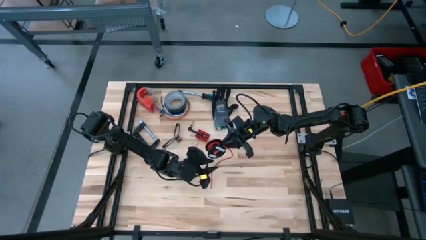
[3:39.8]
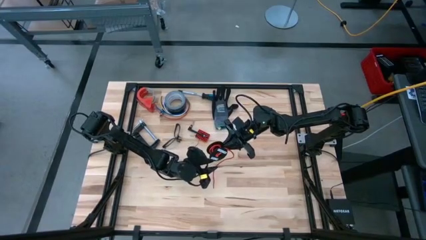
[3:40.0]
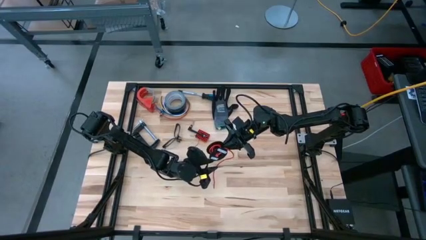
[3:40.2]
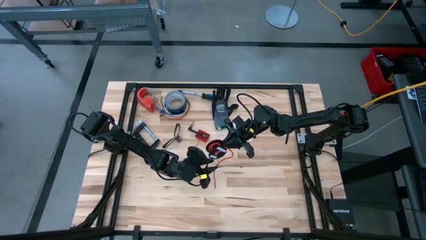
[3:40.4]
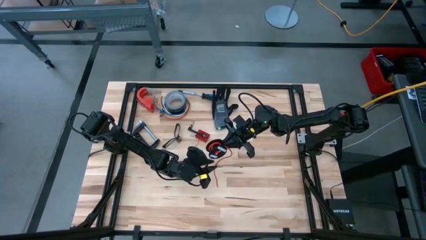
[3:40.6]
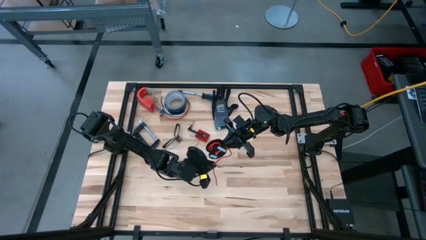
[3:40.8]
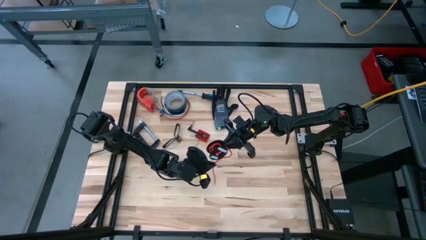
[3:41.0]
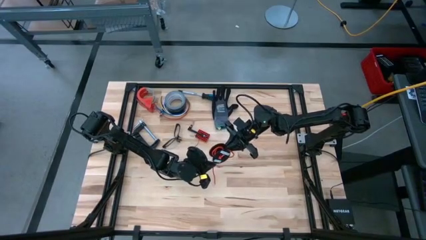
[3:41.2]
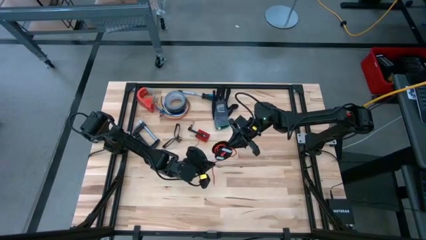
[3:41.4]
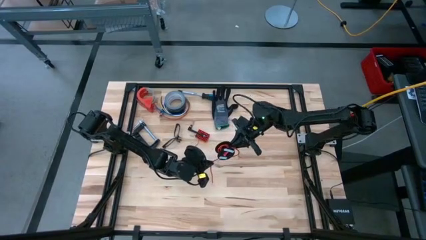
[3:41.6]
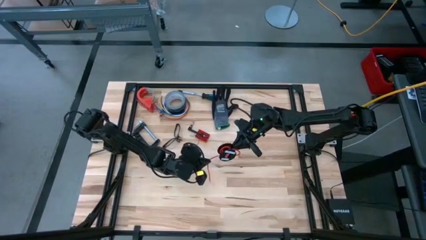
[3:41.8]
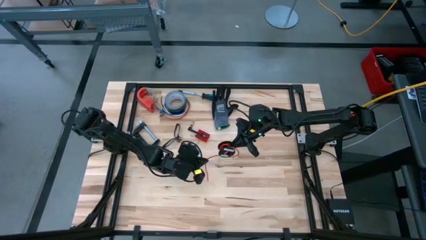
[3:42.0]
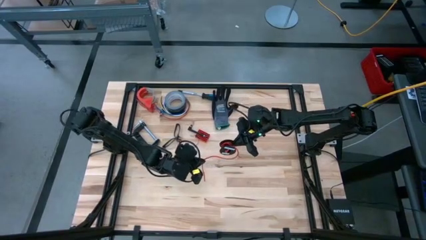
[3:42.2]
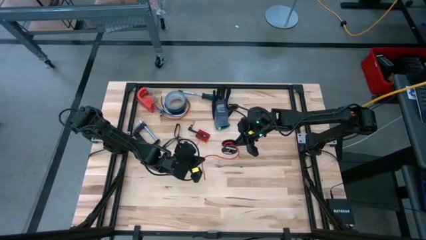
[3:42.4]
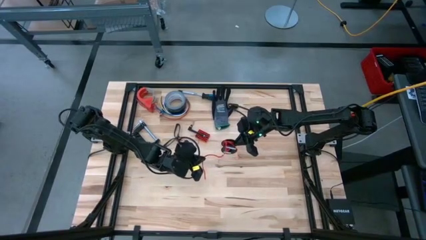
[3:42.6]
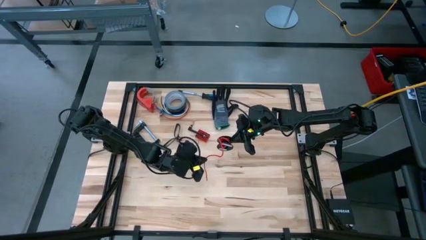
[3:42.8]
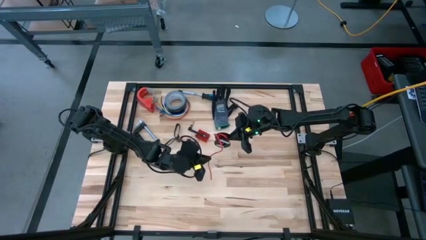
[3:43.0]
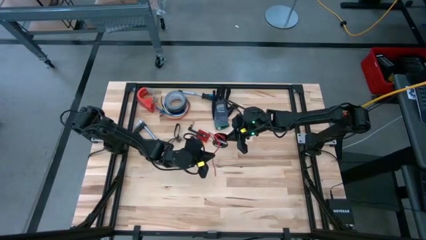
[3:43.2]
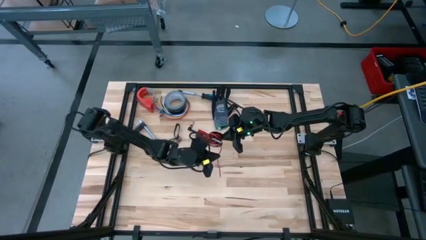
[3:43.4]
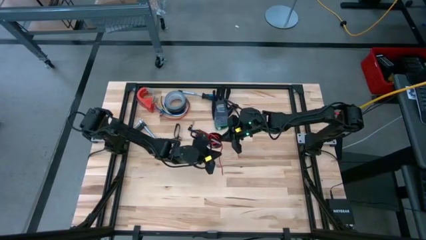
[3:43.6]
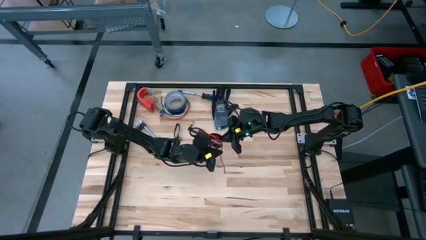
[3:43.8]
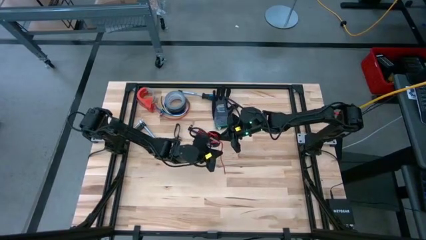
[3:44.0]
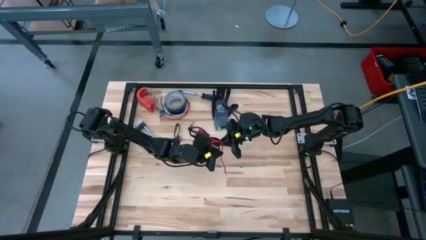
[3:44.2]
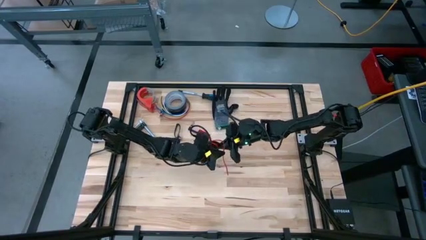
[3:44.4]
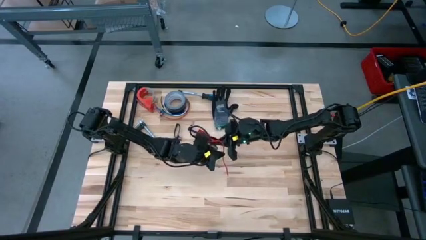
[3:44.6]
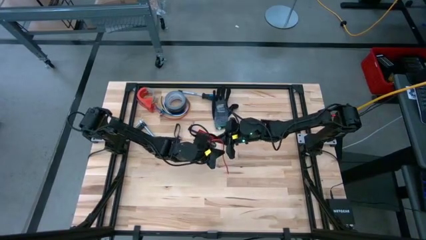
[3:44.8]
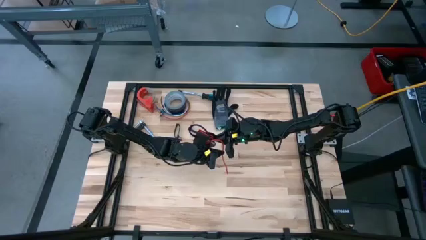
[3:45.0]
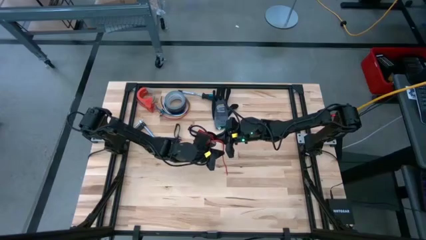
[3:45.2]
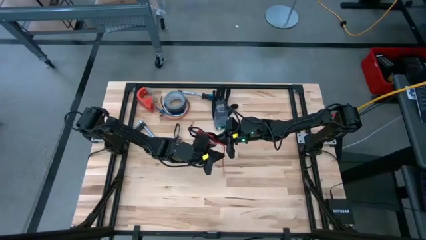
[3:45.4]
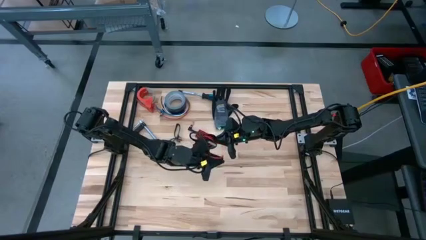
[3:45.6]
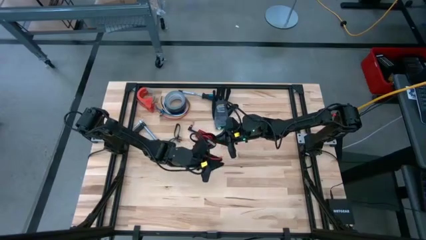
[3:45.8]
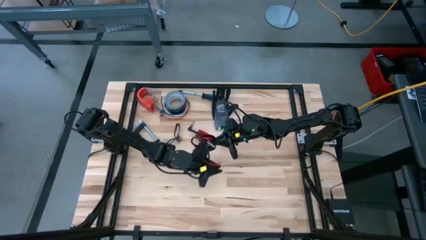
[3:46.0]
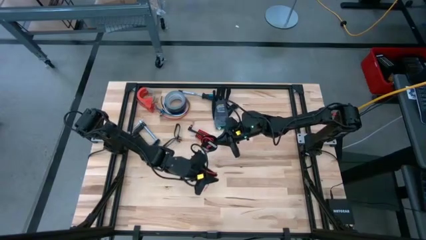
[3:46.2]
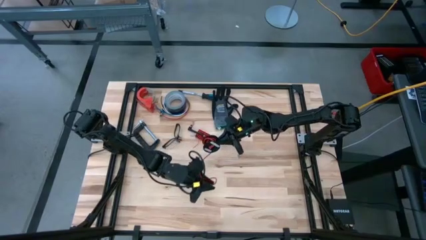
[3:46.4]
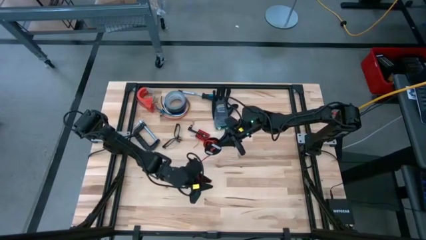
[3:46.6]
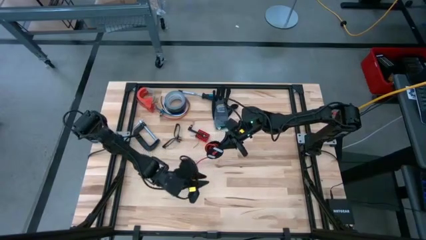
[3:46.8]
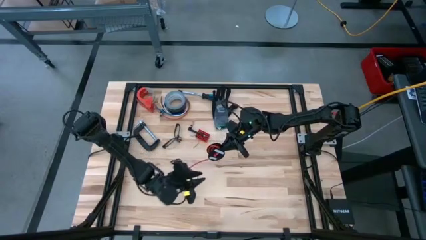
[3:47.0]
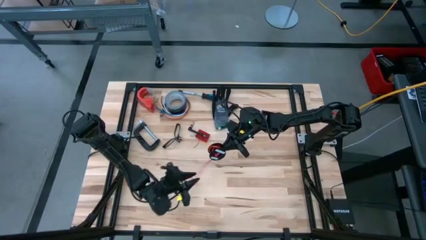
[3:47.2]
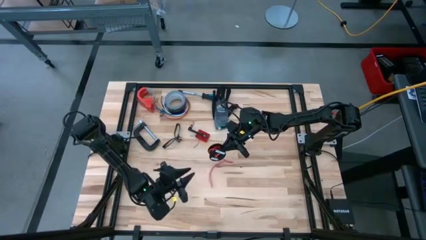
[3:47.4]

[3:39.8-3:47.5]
Task: Coil cords
Coil the orange wire into the black spool

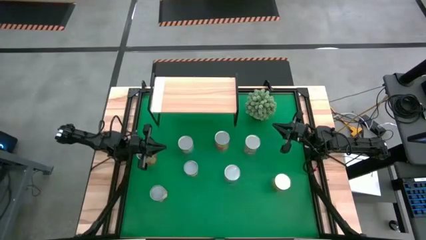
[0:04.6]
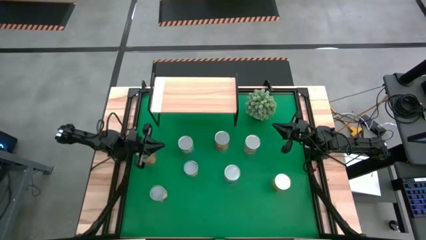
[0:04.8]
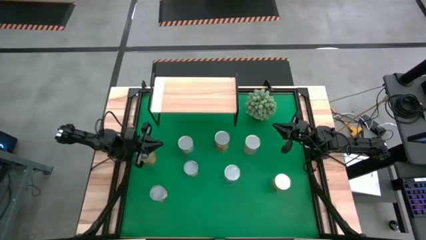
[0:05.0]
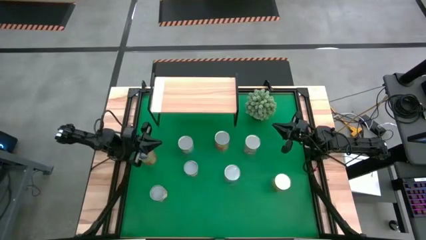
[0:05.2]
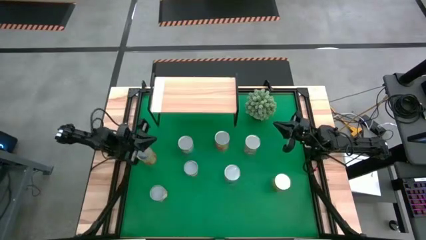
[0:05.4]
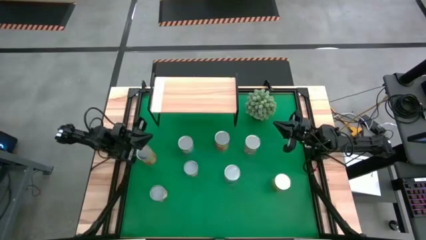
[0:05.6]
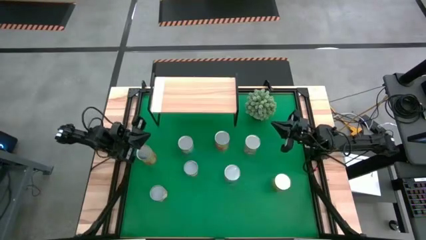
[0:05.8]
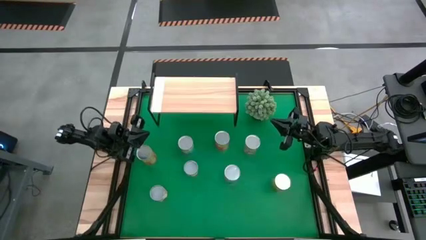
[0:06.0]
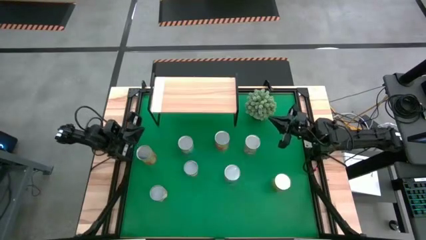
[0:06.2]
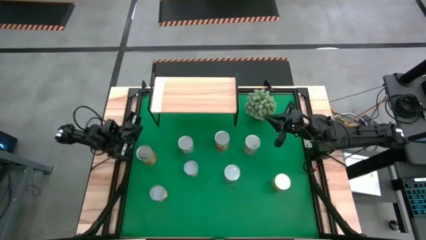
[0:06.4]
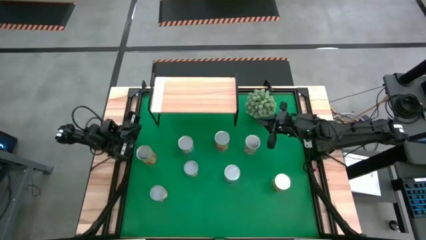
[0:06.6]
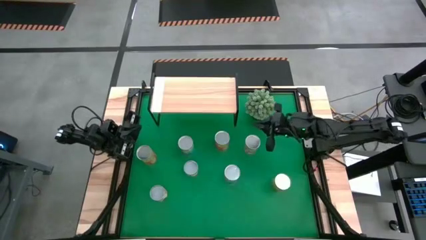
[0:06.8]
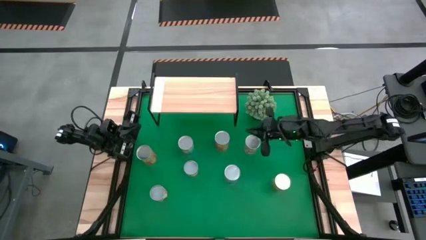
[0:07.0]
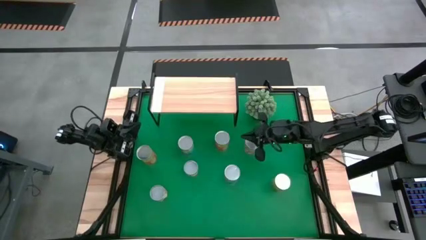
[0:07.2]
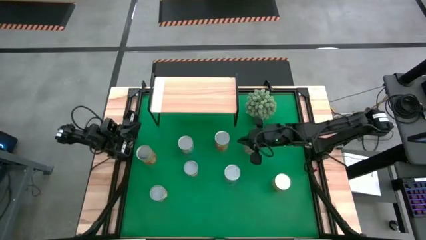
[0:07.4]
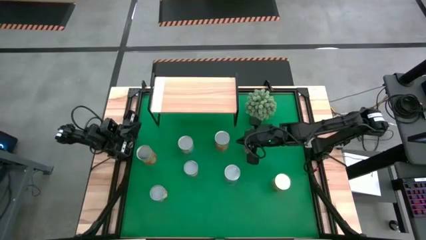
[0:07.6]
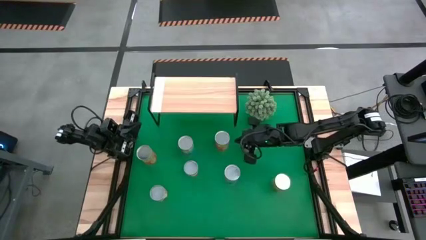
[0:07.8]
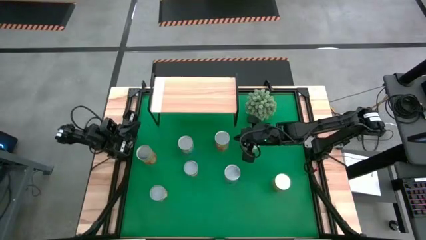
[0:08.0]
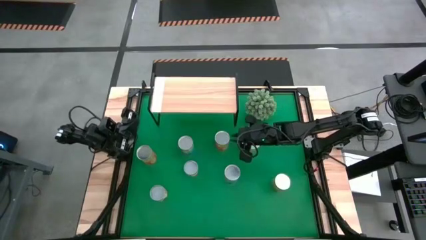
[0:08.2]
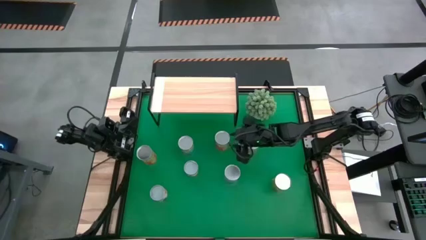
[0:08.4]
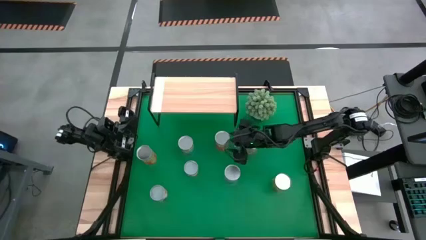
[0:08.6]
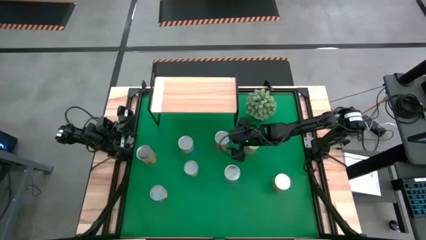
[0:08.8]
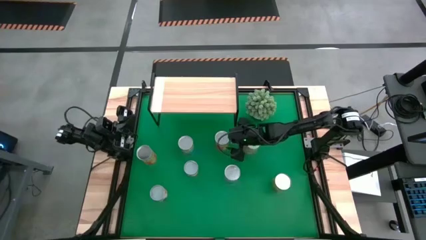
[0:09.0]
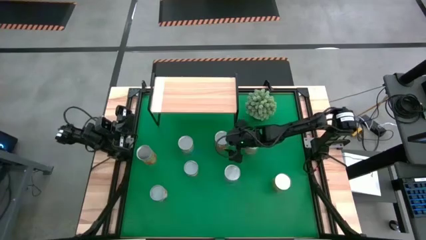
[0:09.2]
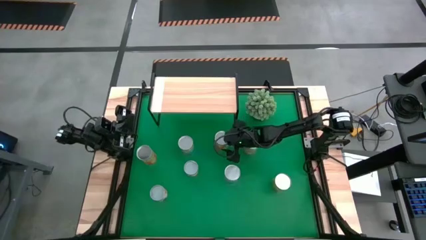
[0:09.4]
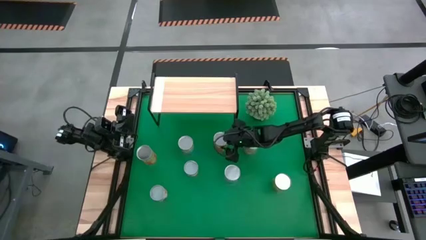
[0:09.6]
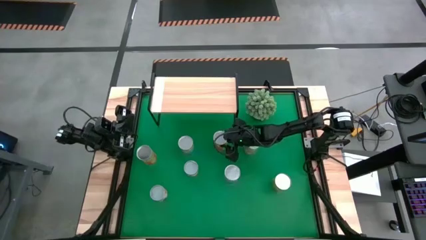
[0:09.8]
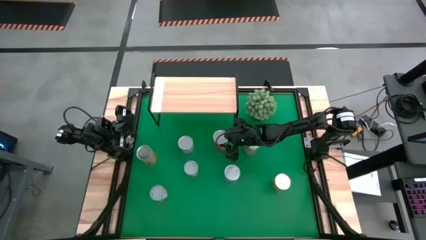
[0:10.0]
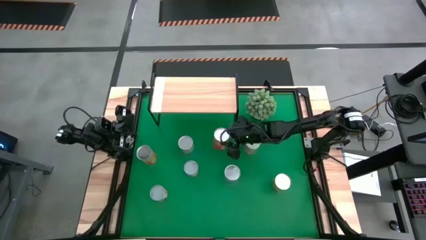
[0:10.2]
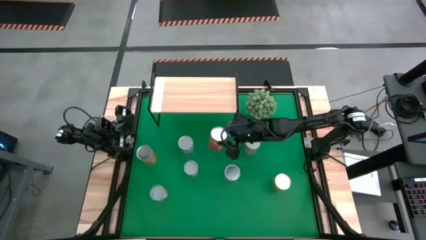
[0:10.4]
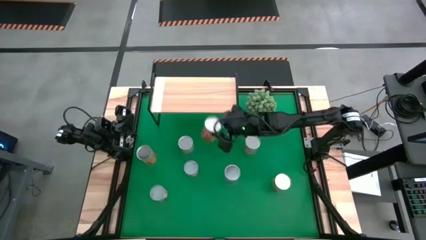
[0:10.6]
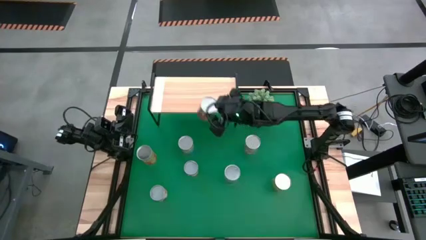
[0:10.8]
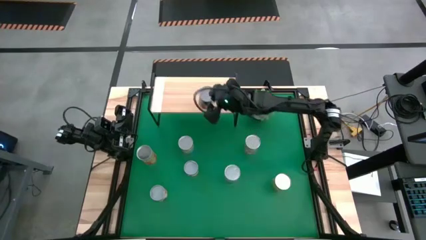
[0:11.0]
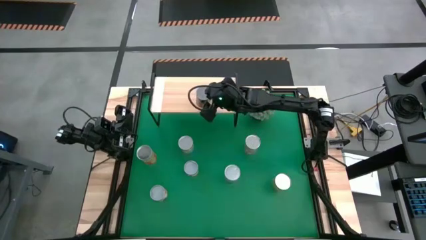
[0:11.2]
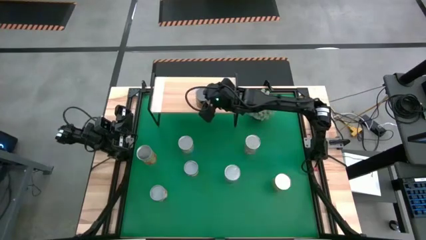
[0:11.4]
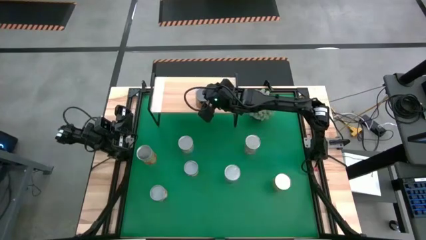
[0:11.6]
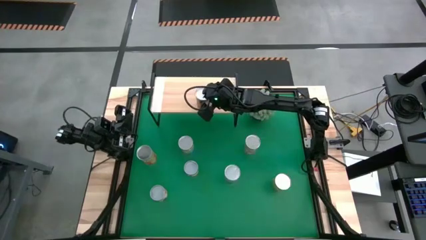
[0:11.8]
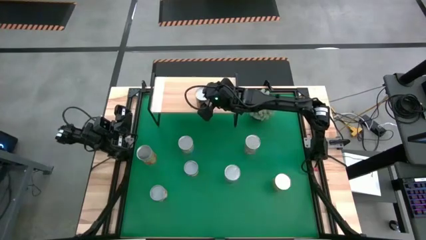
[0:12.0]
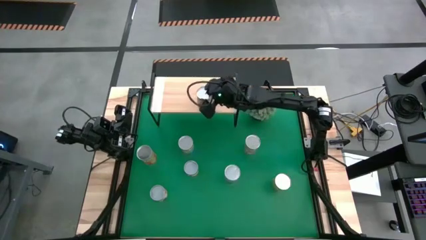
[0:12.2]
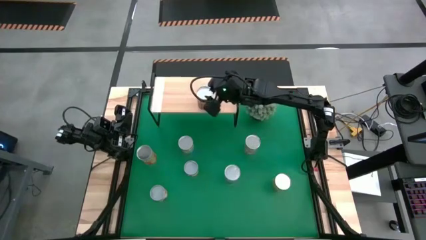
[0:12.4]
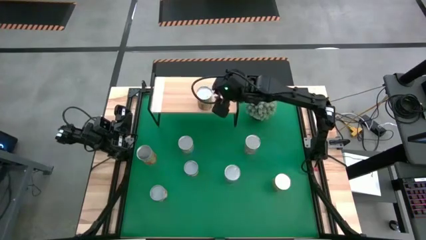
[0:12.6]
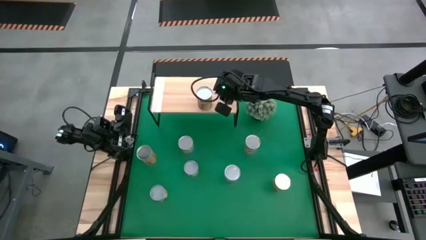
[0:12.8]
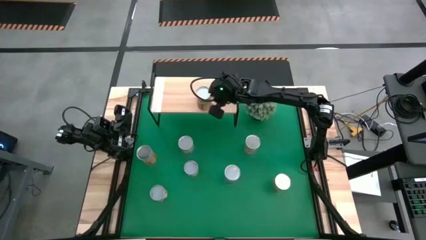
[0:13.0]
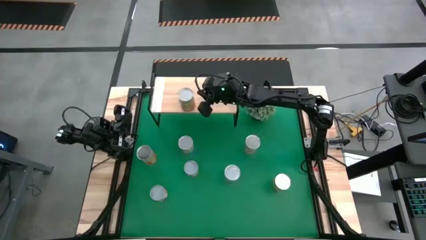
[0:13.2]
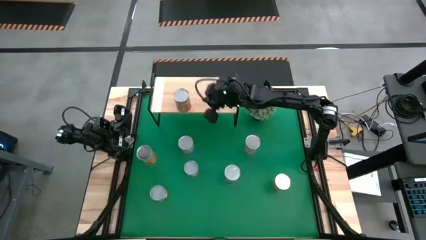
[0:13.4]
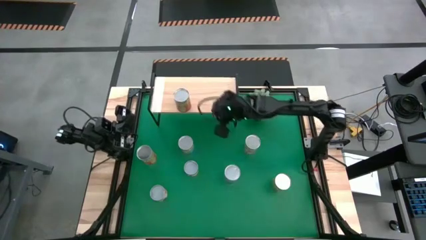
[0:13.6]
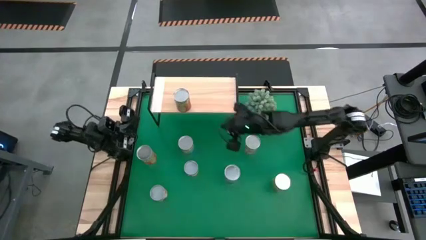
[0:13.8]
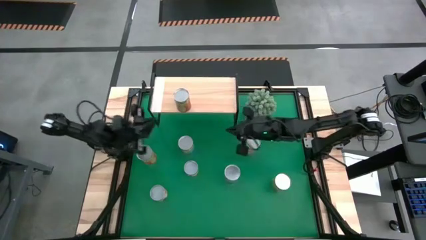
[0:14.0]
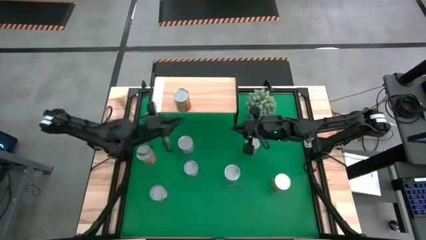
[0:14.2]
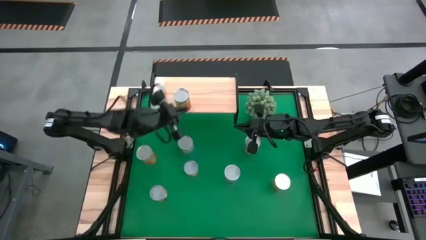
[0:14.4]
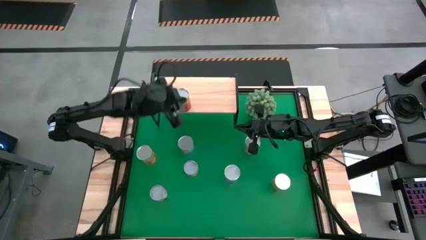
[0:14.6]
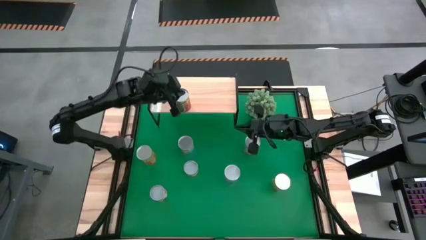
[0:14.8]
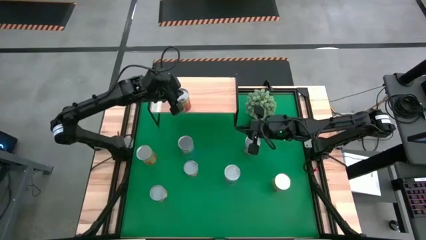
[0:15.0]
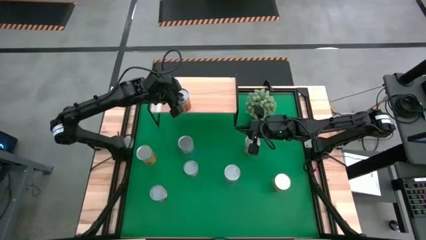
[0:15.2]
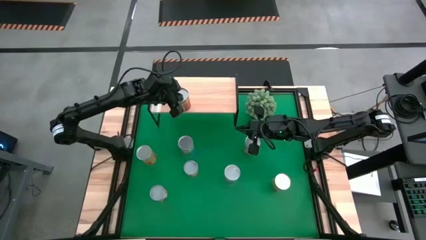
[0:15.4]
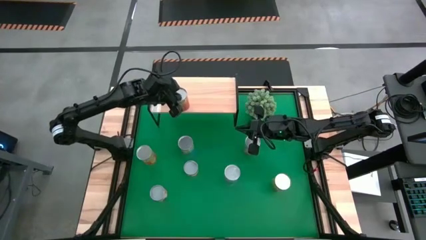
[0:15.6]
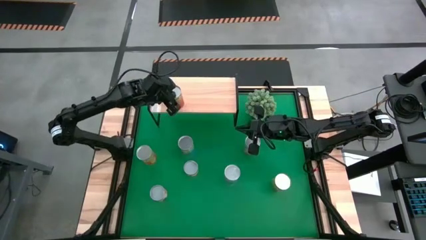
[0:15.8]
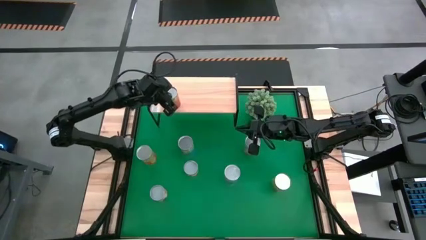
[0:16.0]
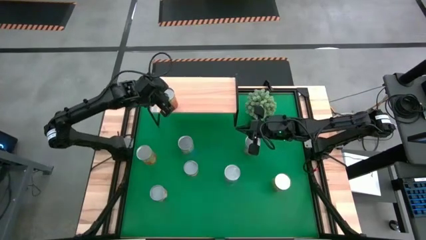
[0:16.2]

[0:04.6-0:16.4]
Task: Pick and place cans onto a shelf
Put the right canned pineapple on the shelf
